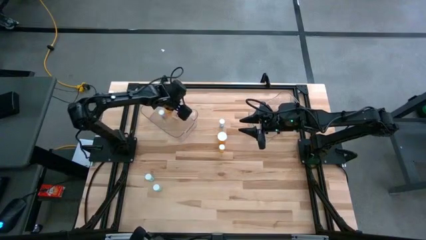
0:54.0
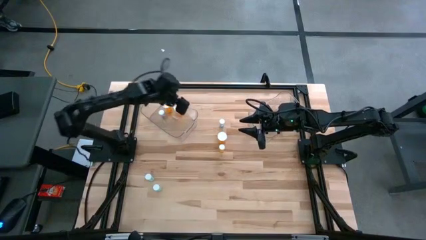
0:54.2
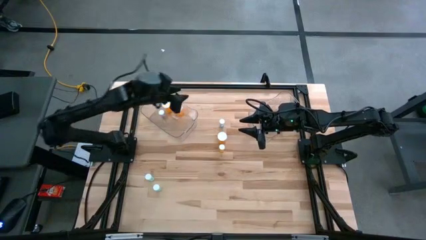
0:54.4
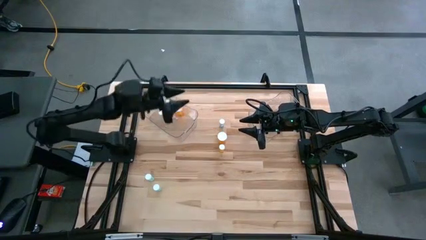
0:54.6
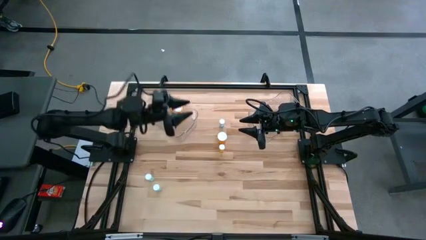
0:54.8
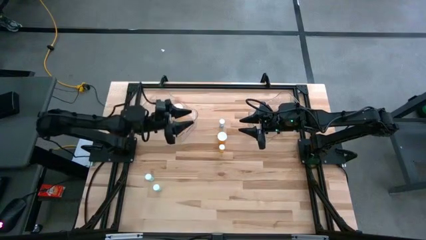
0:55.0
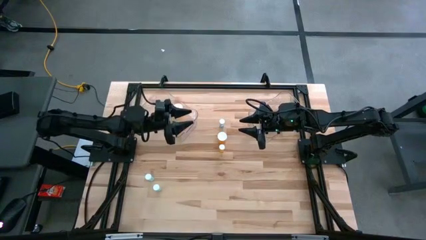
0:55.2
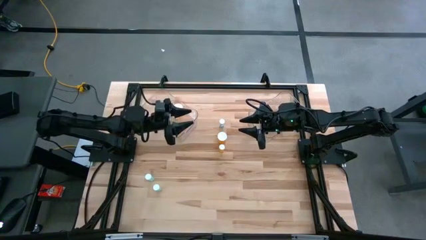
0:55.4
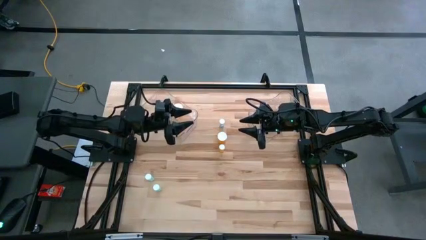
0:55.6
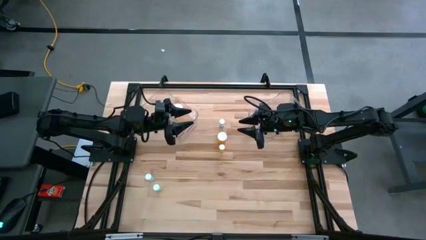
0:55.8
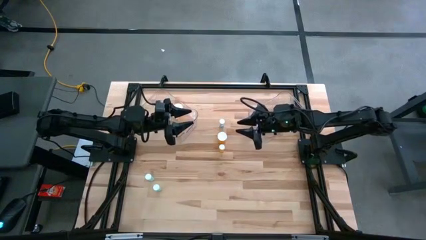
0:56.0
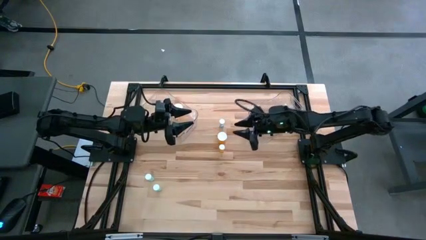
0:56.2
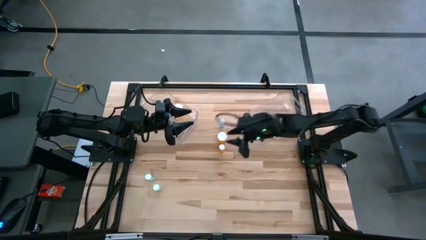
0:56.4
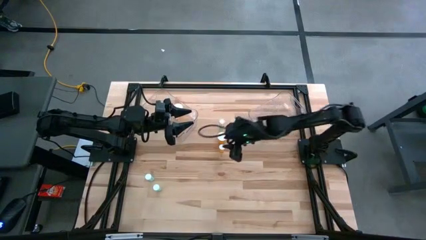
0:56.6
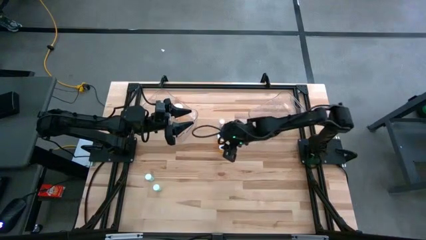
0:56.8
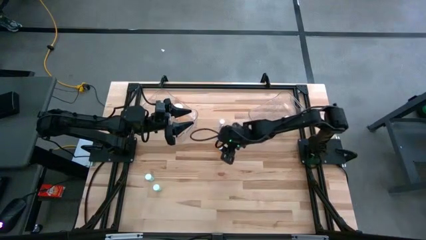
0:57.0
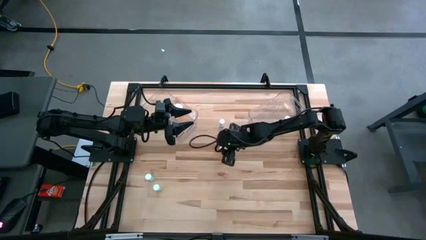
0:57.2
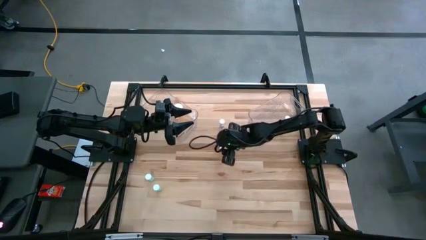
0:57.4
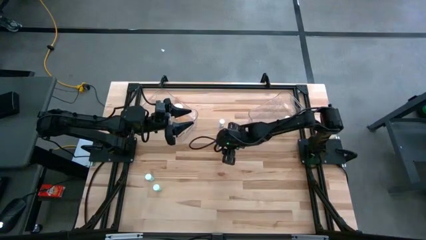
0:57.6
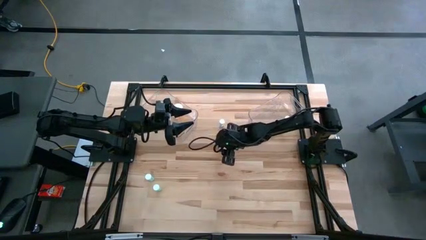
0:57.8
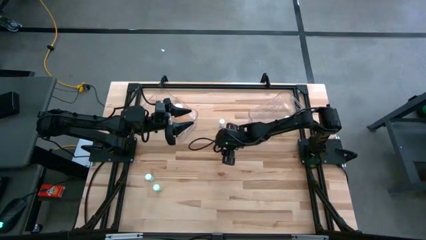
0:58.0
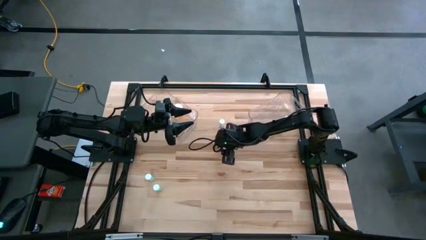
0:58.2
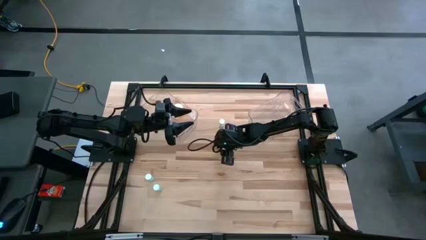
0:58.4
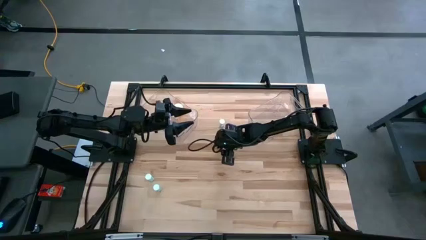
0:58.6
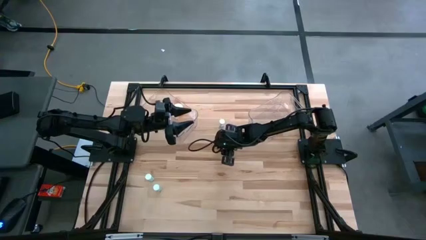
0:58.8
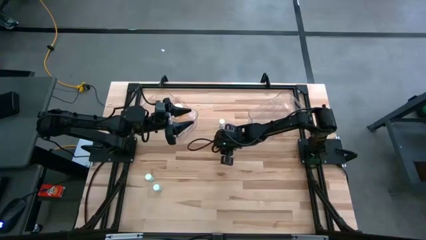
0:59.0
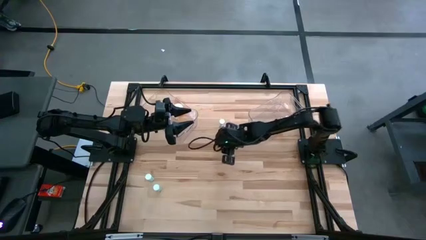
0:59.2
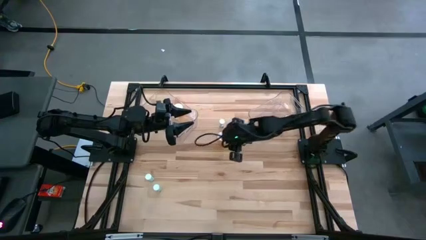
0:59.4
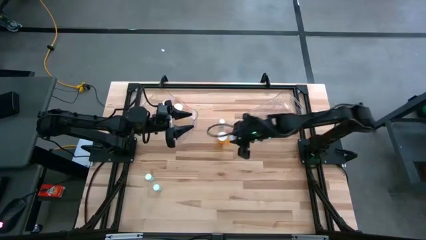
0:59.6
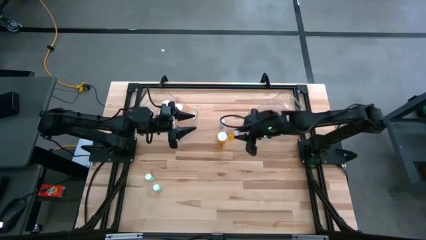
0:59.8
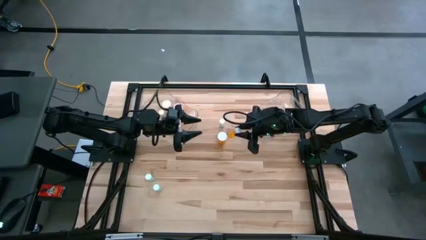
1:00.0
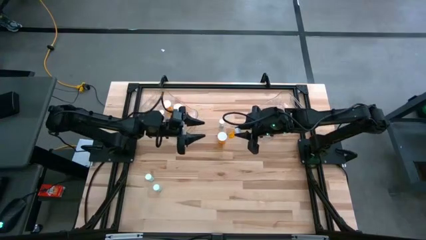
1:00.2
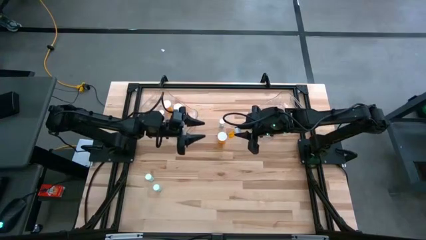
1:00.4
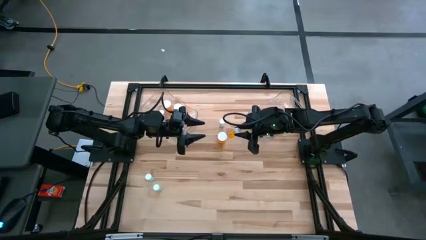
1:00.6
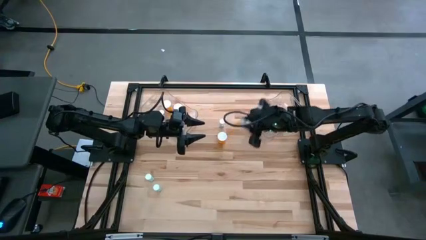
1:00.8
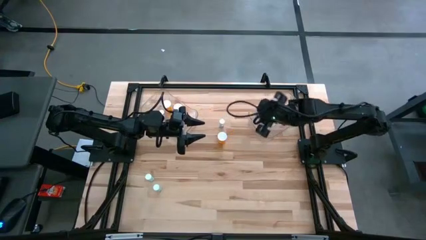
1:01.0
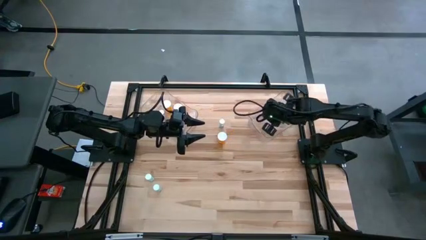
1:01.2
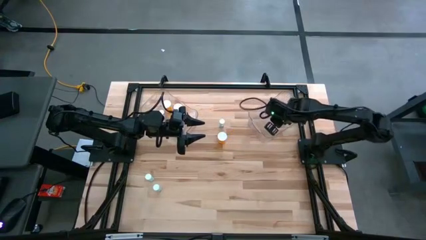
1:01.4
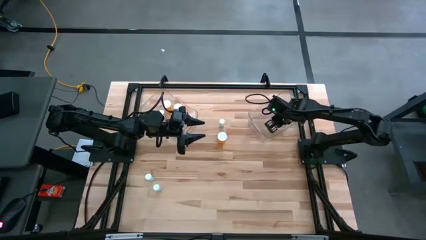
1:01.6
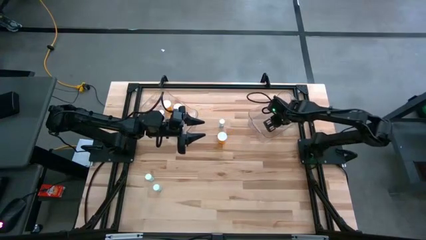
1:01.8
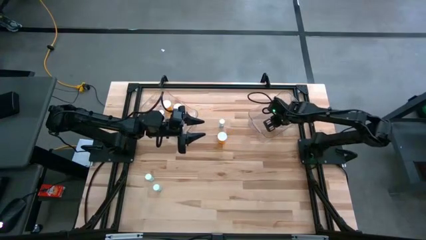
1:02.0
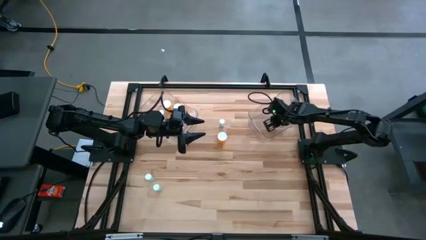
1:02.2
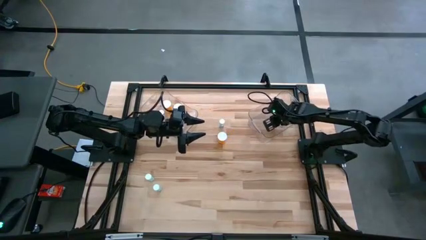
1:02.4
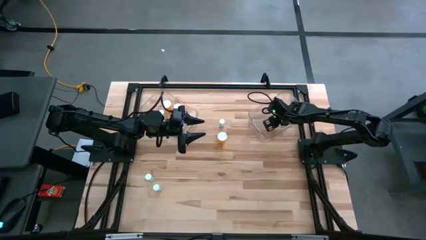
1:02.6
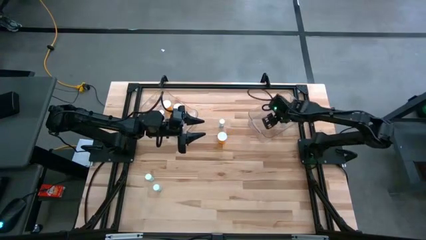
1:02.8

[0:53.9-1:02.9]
Task: Pick and place medicine bottles into bin by pill shape (circle, oval)
Put the orange tablet bottle into the right transparent bin

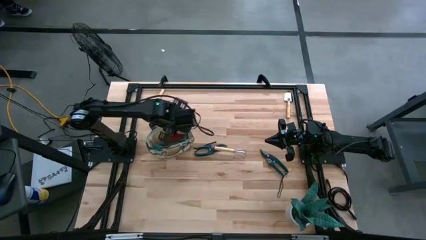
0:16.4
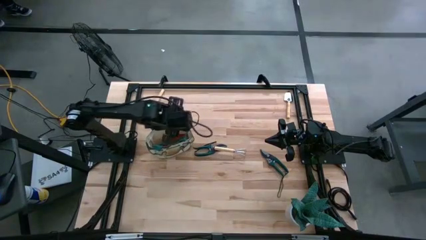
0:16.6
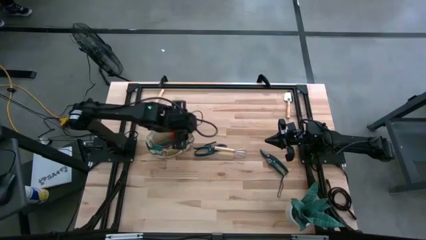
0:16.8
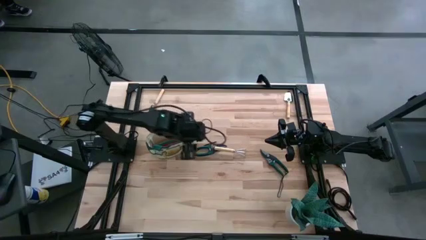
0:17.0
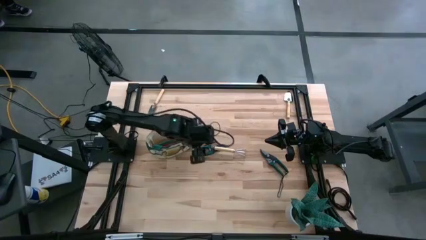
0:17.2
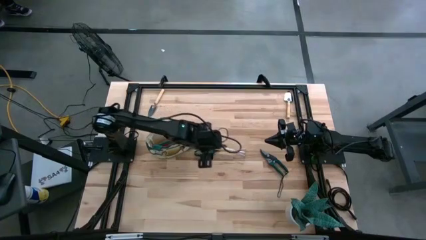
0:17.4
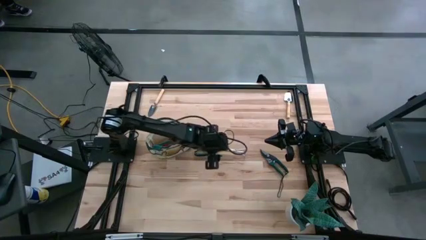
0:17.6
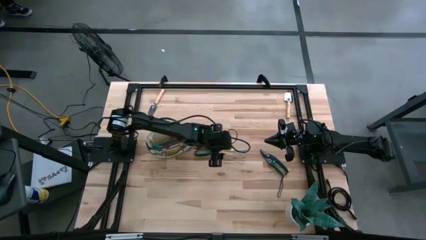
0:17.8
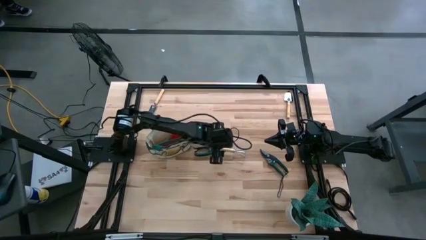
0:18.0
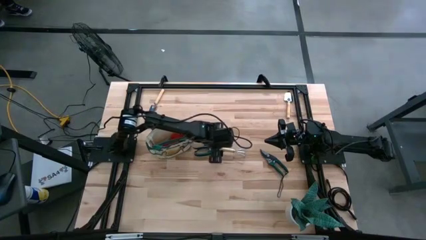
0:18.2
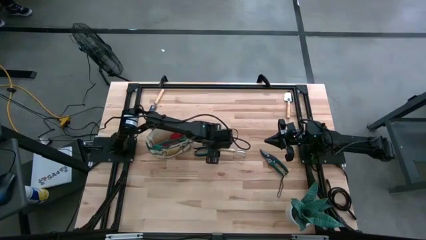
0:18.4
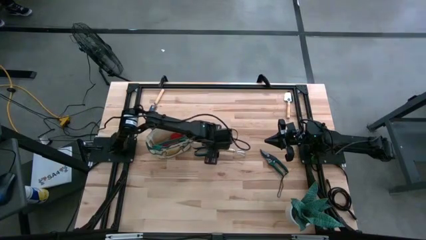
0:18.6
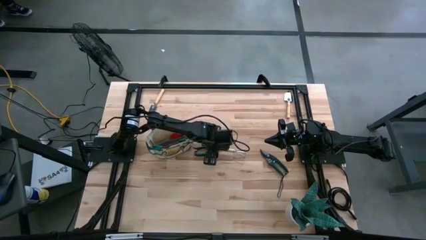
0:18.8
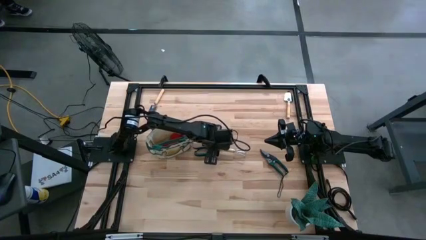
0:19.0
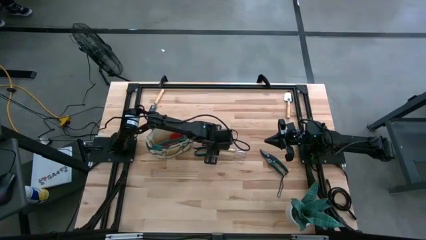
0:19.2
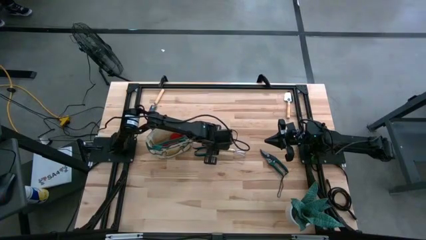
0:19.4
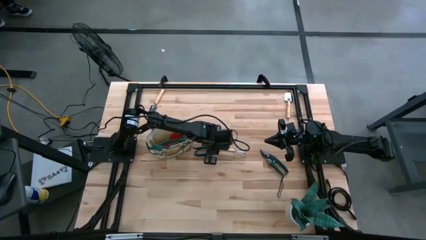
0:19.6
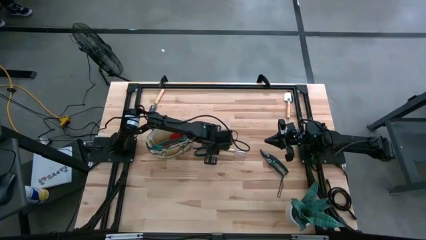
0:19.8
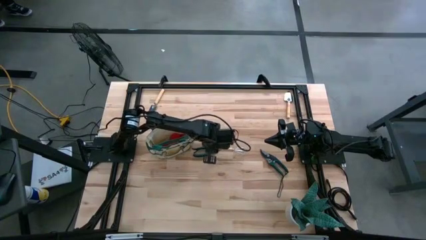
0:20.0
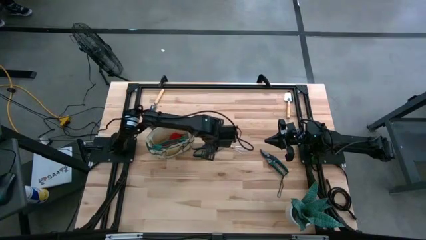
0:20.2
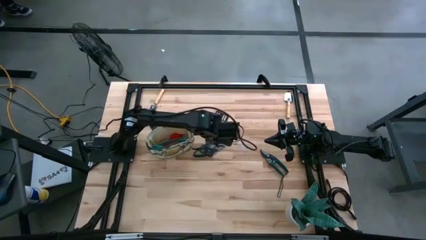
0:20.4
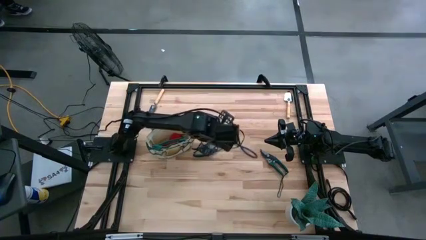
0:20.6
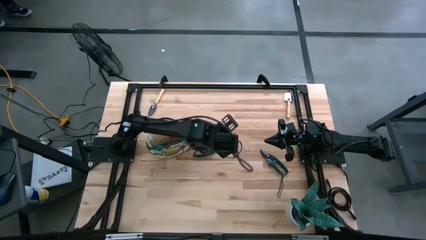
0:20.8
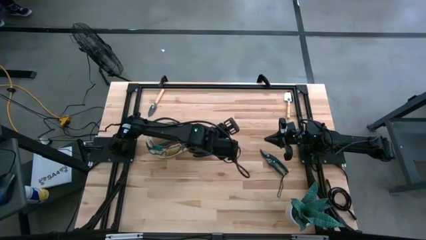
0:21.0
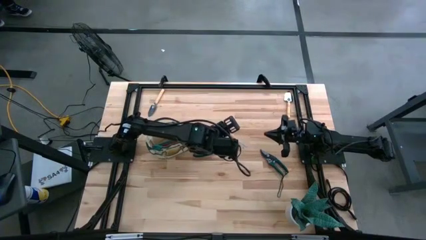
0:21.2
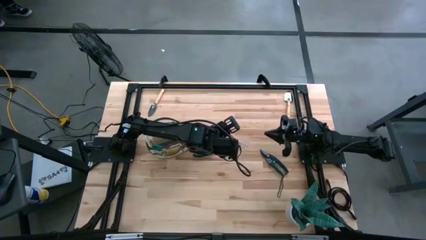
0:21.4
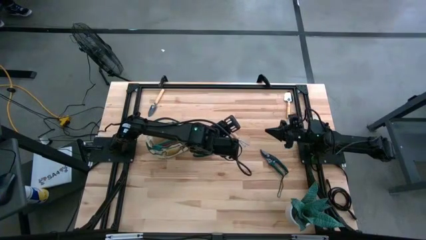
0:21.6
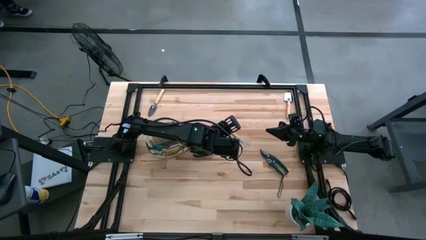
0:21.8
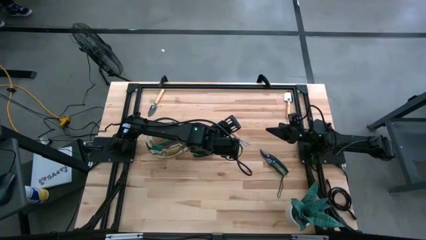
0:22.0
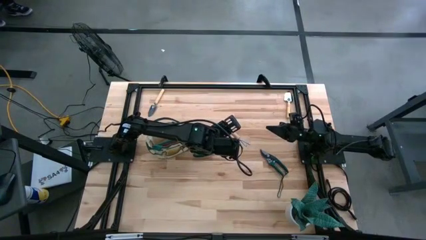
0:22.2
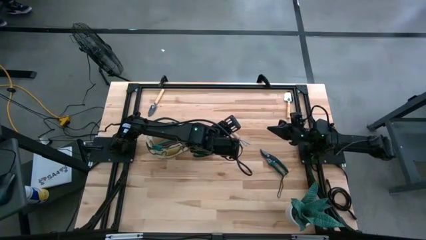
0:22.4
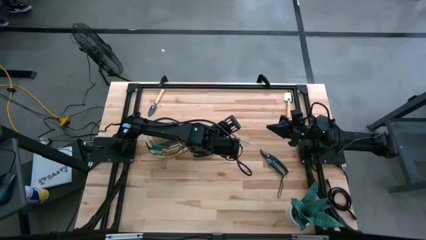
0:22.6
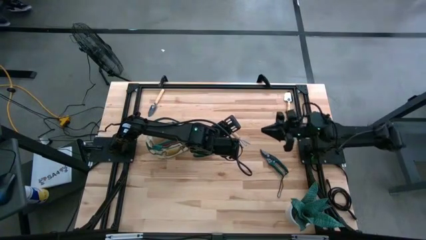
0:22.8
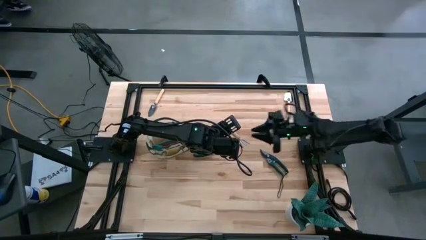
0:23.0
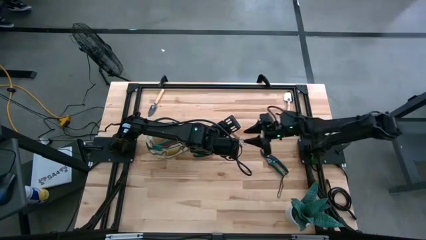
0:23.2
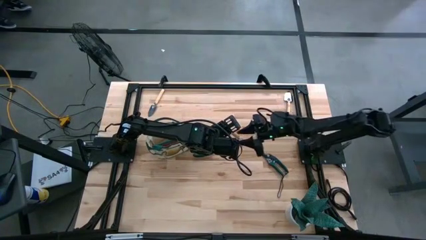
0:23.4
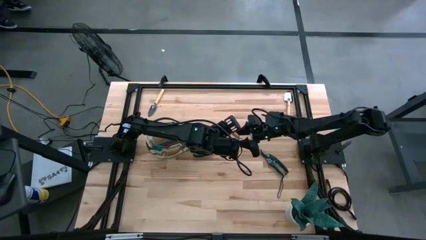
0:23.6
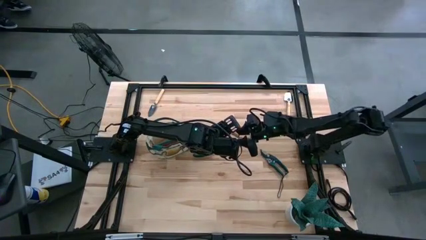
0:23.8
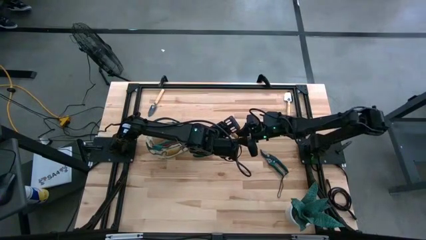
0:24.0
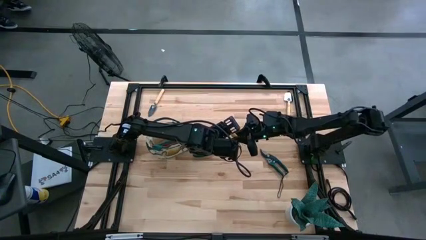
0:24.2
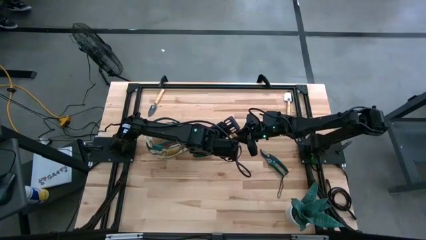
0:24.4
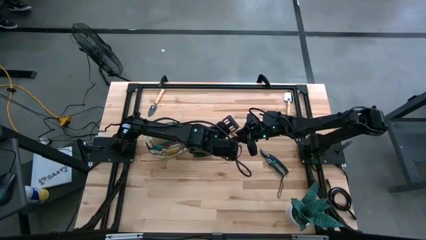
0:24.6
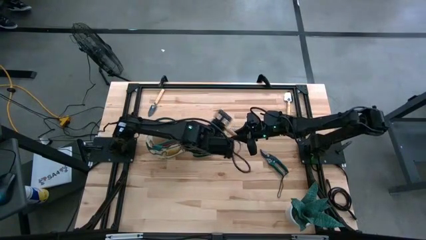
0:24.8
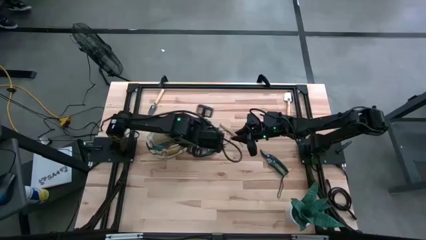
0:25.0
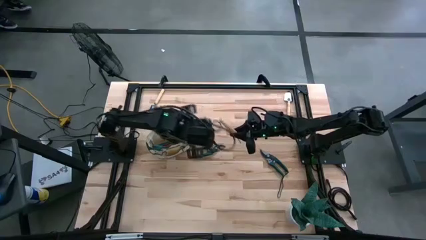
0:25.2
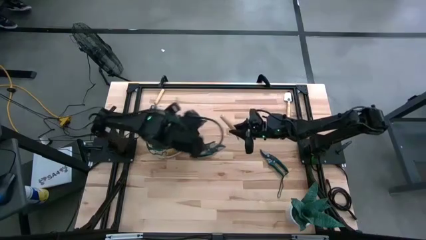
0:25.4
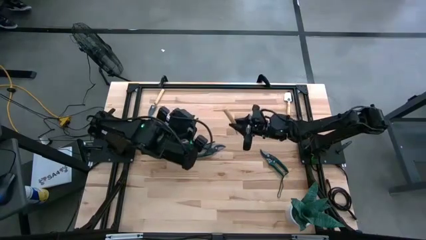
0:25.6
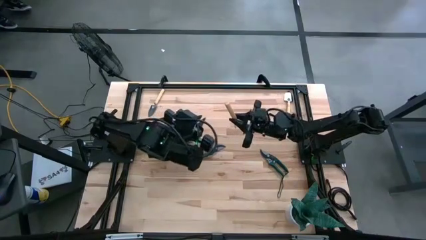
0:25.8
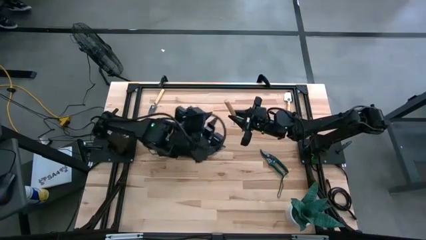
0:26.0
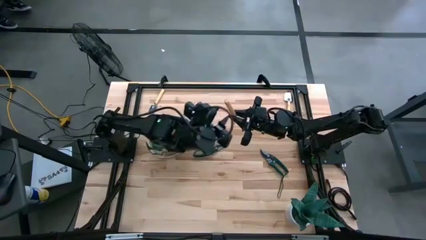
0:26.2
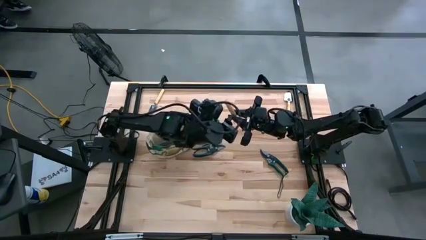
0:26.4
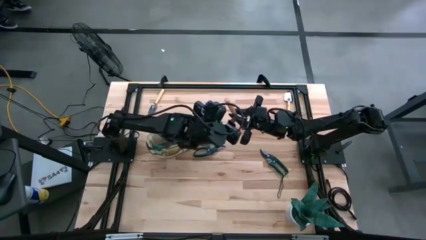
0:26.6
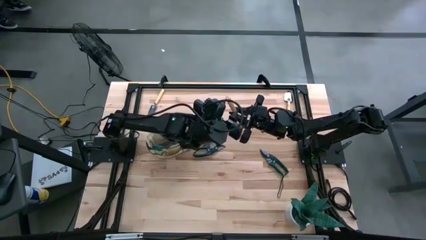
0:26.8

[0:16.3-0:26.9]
Task: Pick & Place Garden tools in Gardening bag
Put the light brown hand rake into the white gardening bag
